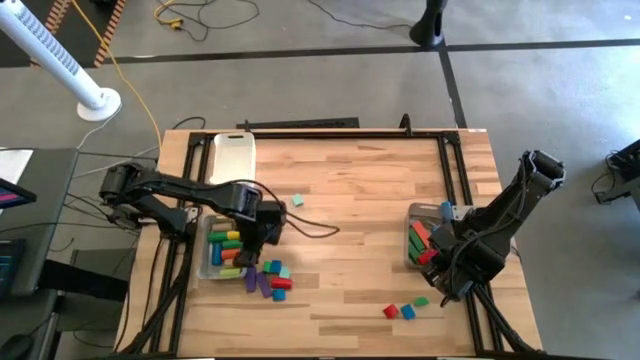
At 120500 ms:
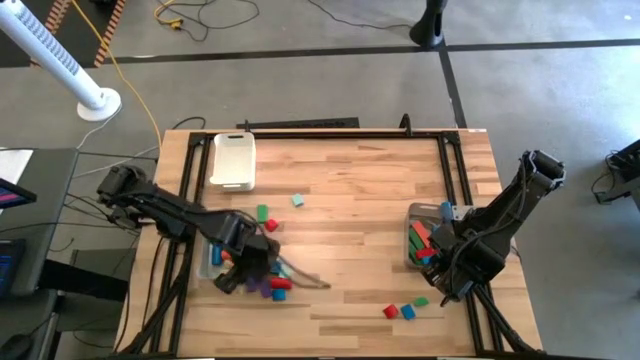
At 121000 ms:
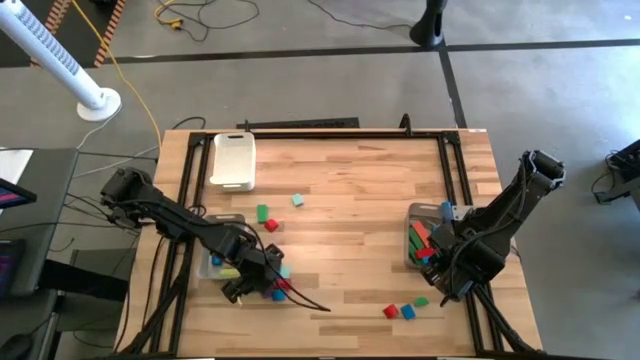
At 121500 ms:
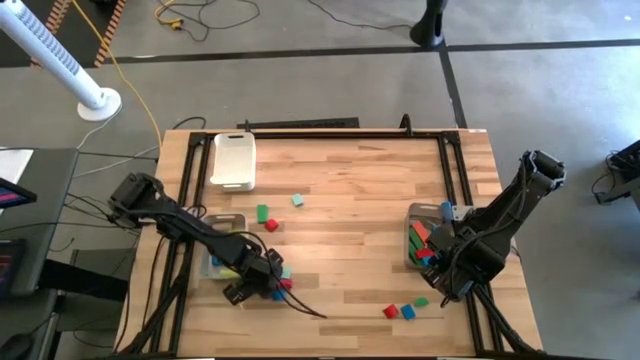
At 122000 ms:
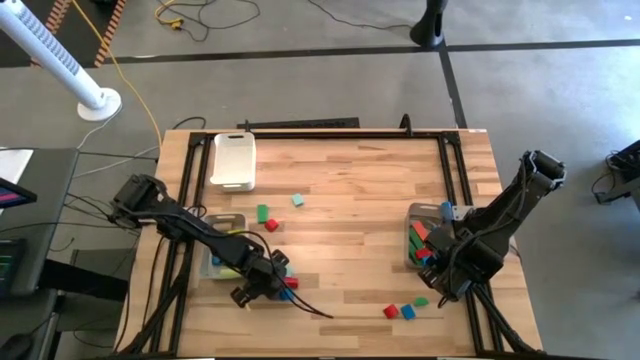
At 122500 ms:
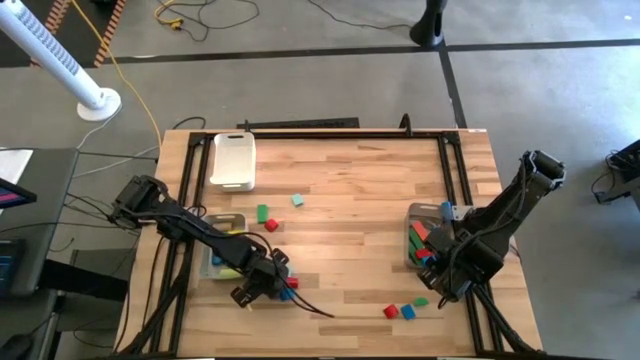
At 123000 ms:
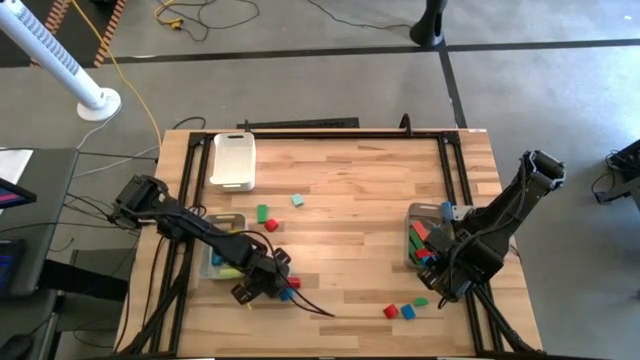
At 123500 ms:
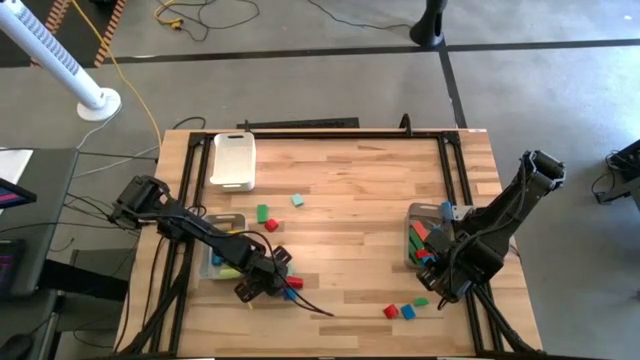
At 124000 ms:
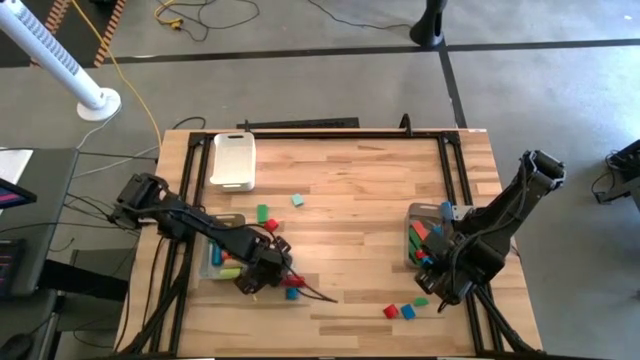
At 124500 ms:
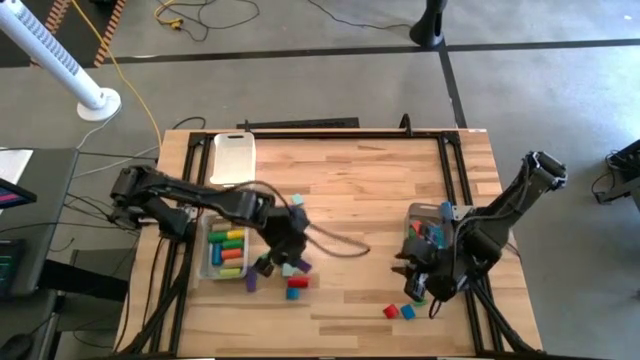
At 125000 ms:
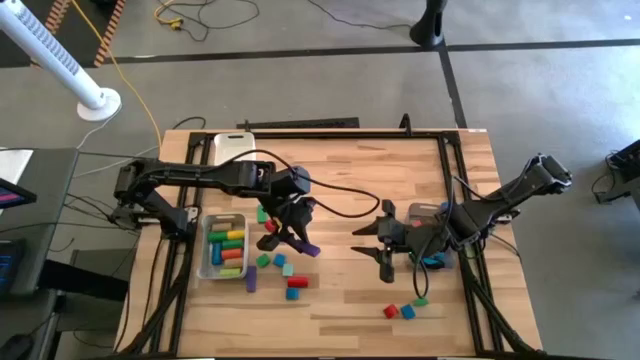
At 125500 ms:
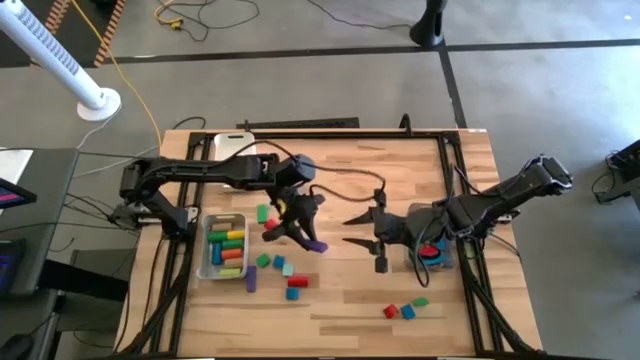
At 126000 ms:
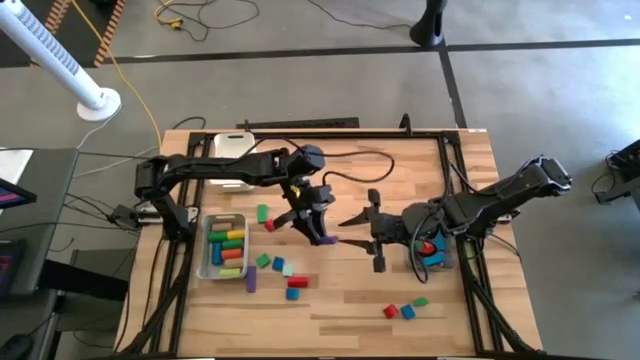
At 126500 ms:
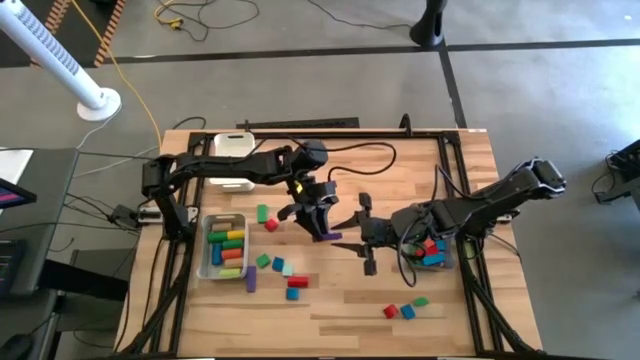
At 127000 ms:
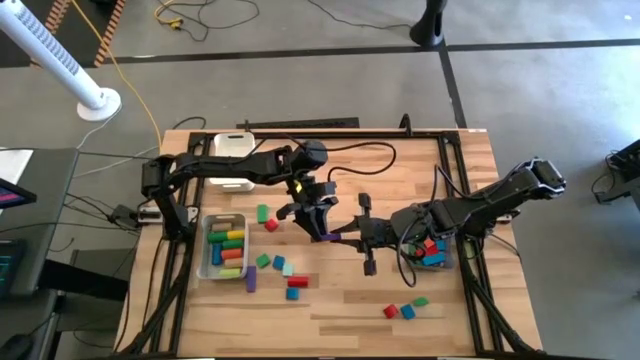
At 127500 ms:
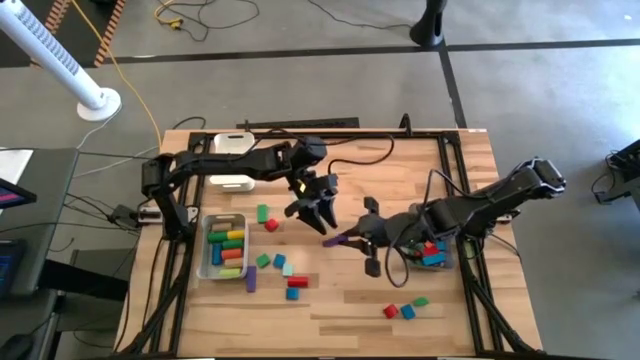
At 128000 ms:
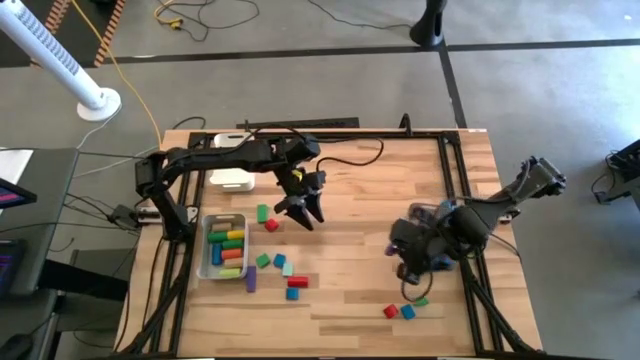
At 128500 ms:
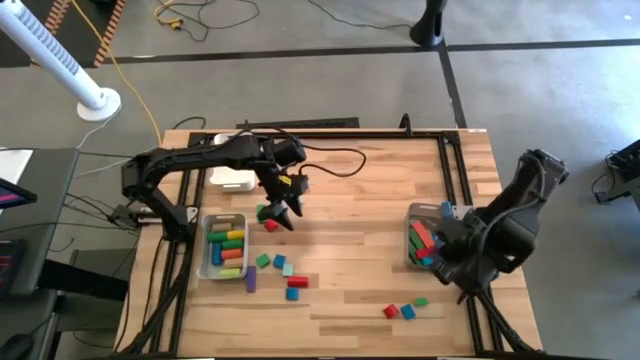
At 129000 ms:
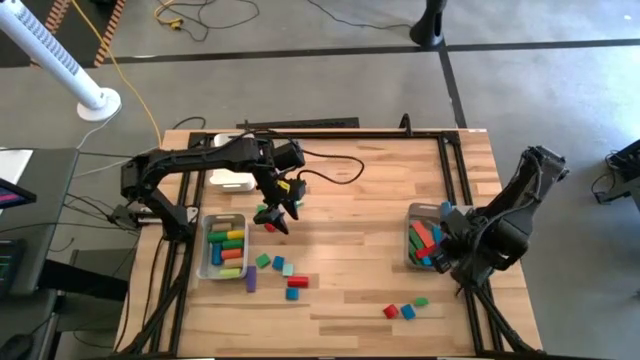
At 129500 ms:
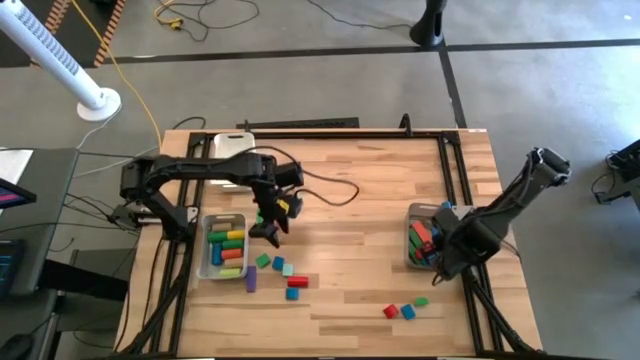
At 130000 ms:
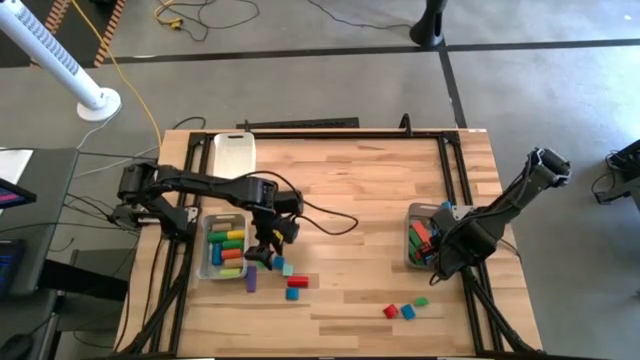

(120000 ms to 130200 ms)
Task: Sort blocks by size
Put the purple rectangular block into the black bin

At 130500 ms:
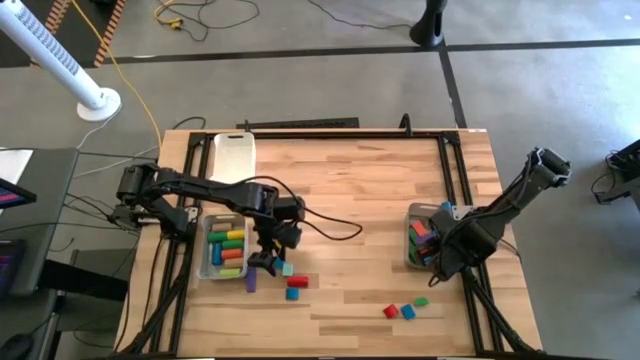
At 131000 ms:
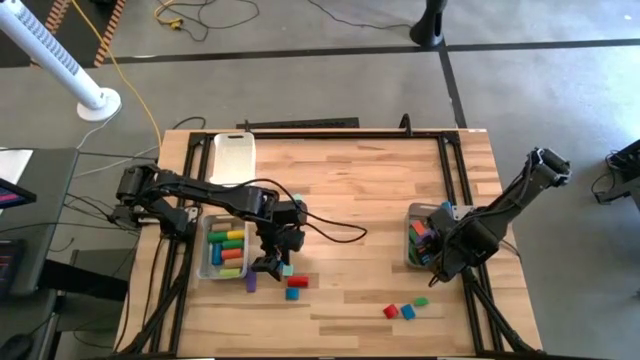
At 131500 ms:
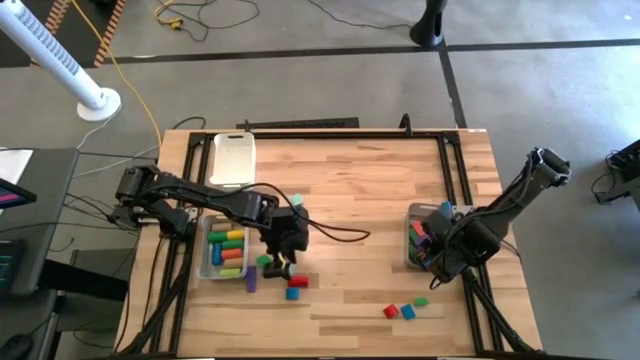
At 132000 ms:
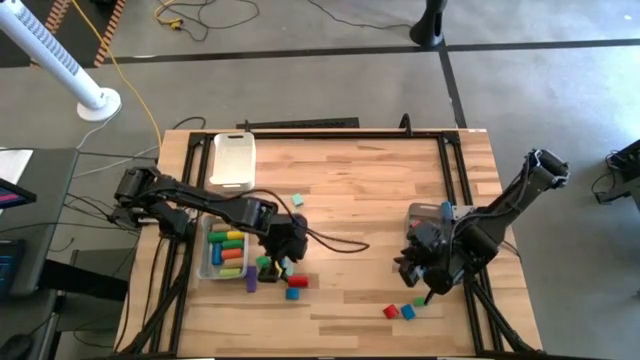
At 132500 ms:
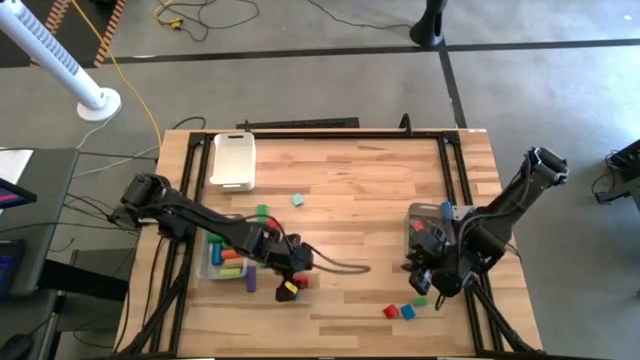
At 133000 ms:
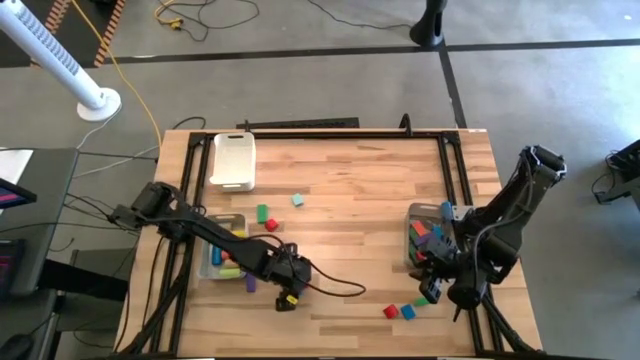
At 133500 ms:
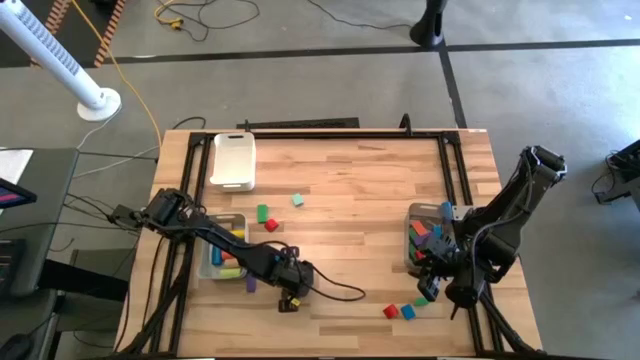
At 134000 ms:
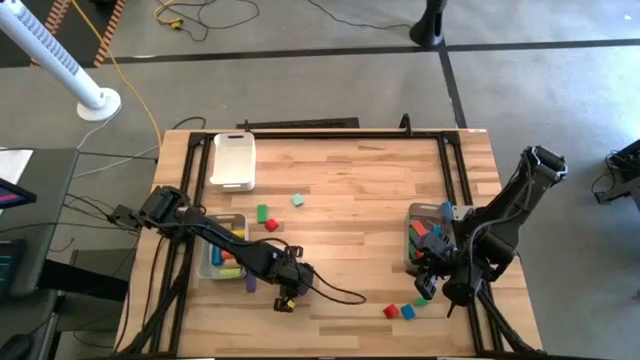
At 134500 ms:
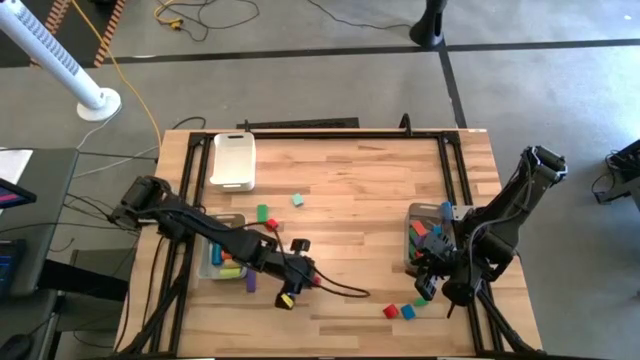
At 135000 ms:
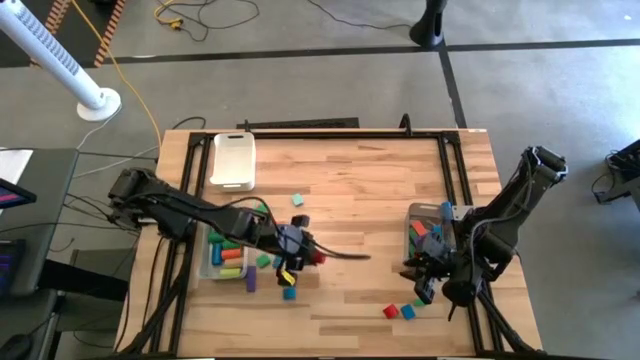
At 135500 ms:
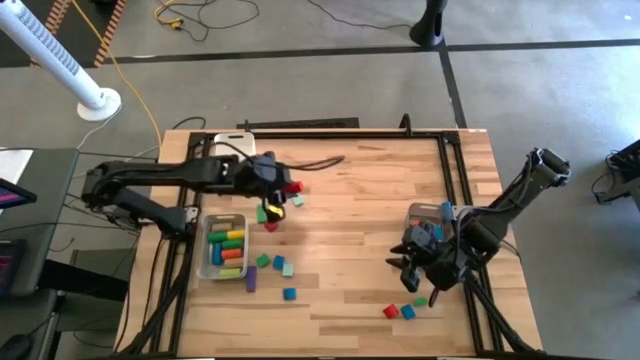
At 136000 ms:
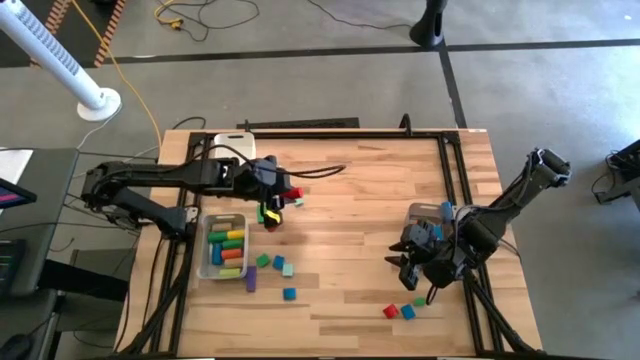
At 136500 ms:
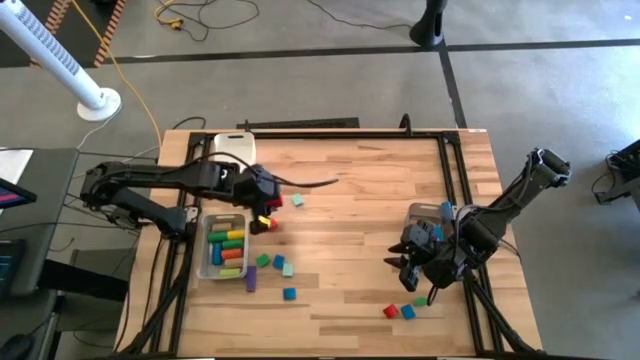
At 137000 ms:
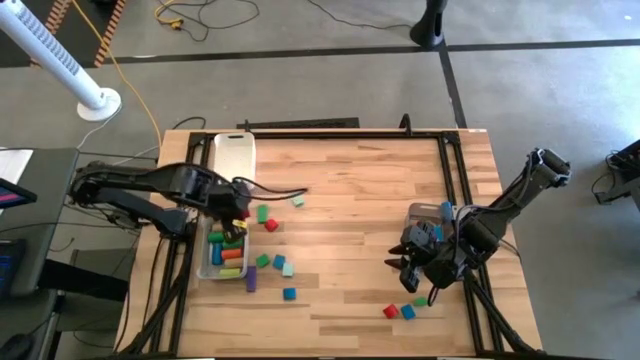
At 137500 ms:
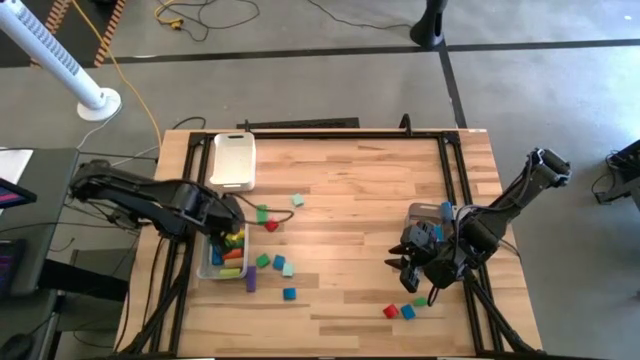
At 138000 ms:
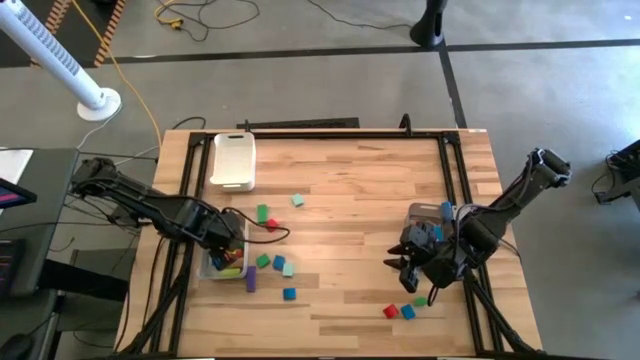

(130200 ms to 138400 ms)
Put the red cylindrical block into the gray bin

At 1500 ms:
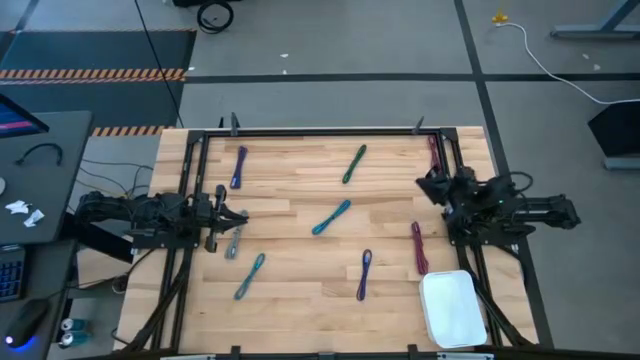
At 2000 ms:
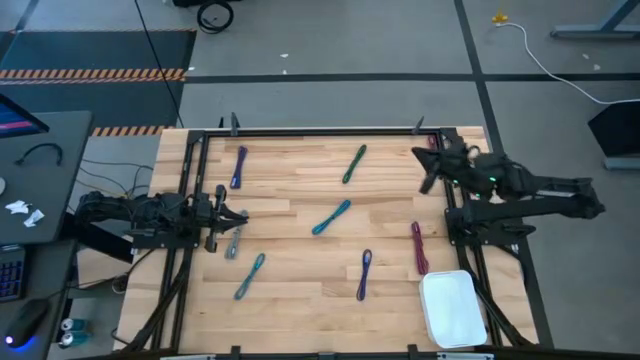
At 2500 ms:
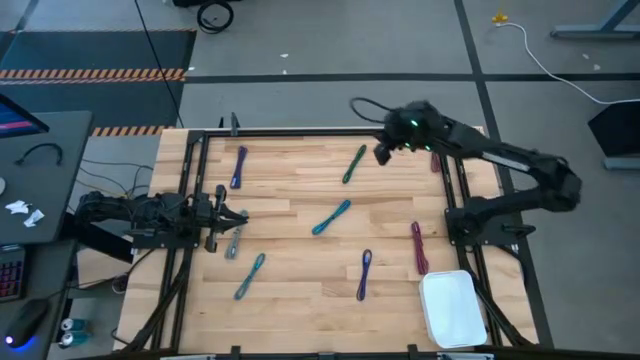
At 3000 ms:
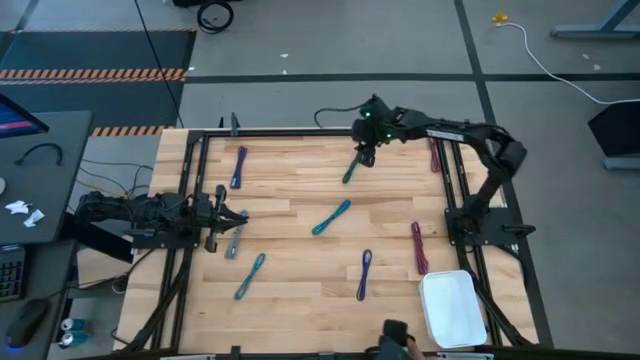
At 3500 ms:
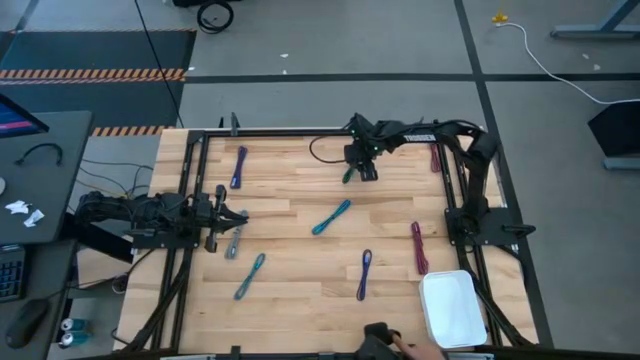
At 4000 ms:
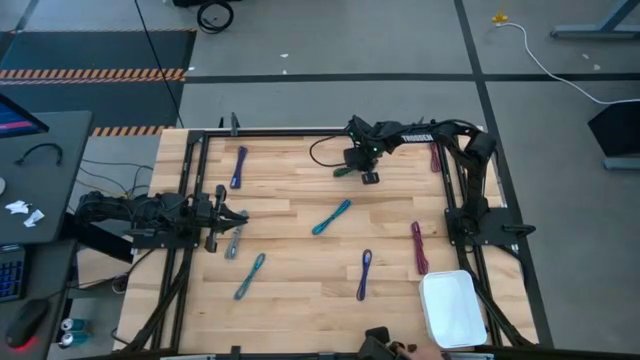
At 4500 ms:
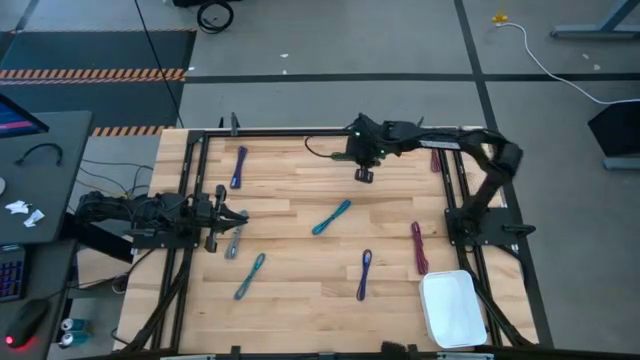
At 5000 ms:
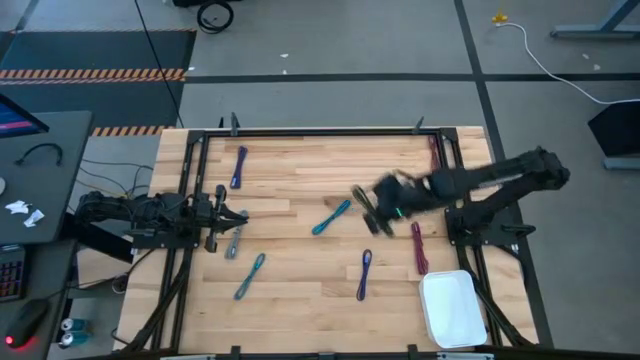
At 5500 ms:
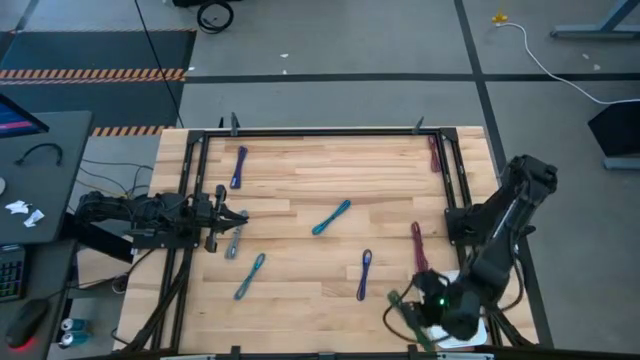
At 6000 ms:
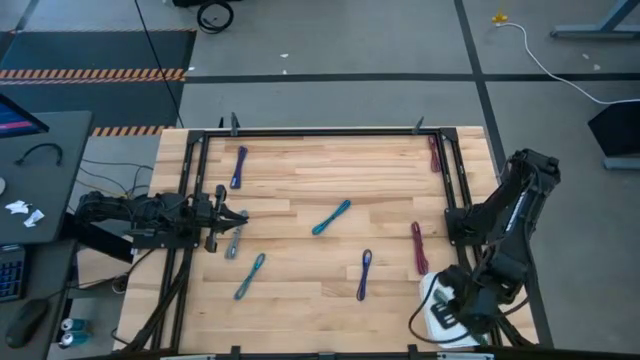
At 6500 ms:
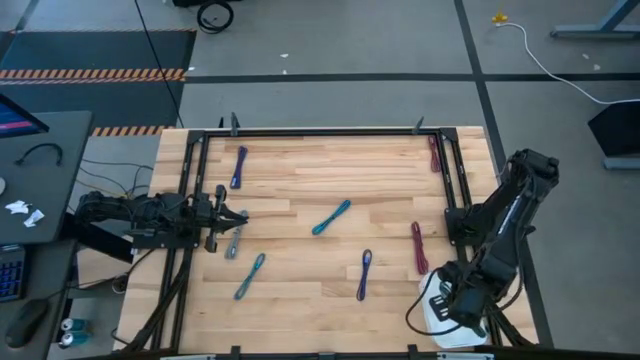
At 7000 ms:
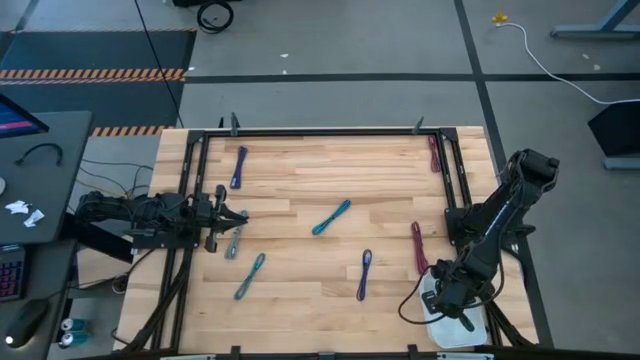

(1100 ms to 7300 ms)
Task: Pick and place USB-C Cables
Put the green charger cable into the white bin
